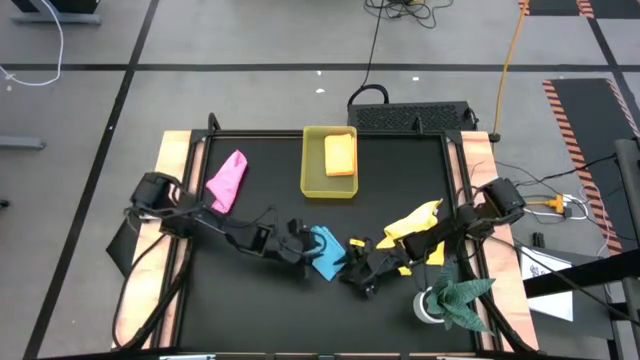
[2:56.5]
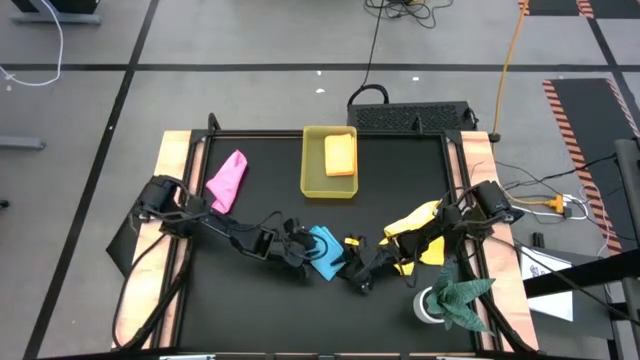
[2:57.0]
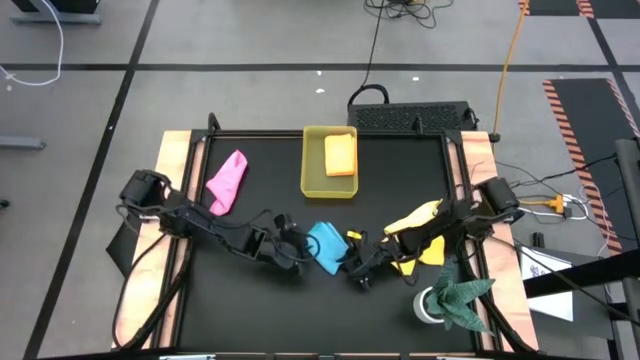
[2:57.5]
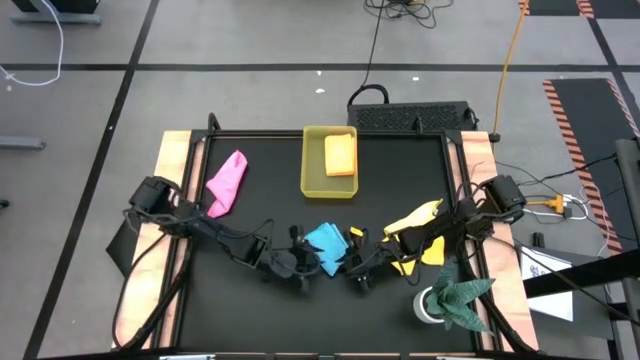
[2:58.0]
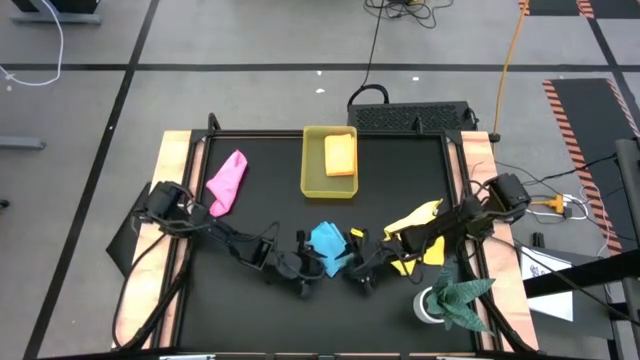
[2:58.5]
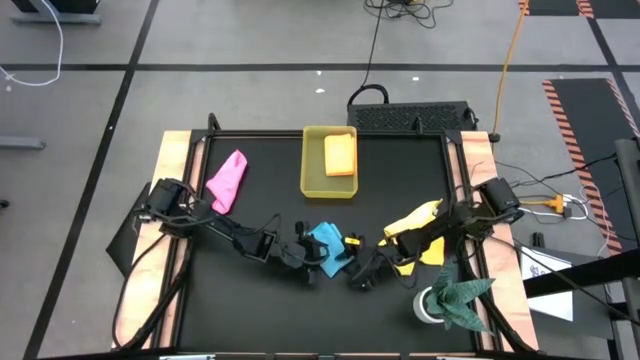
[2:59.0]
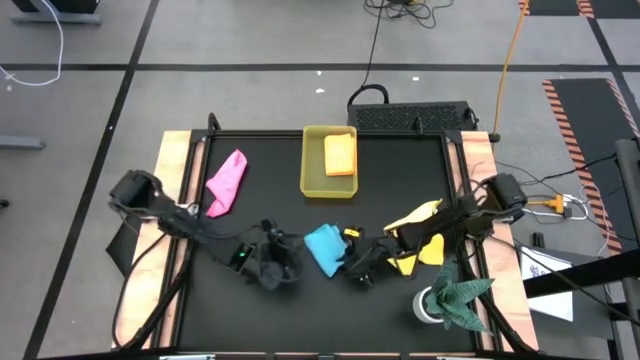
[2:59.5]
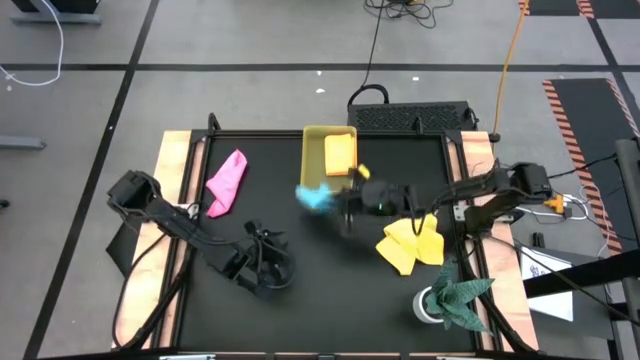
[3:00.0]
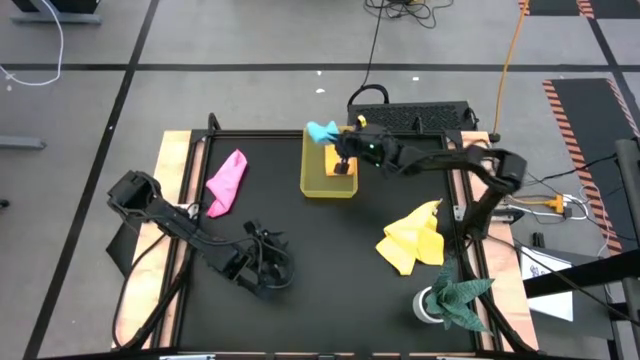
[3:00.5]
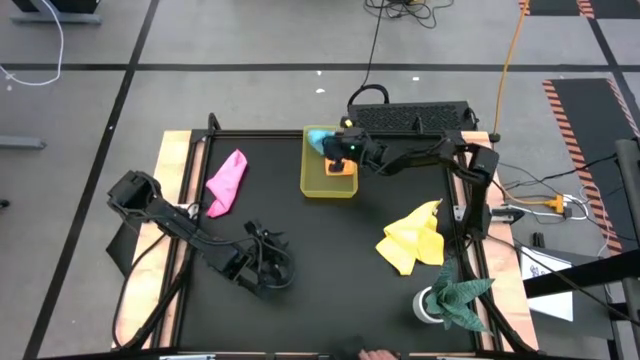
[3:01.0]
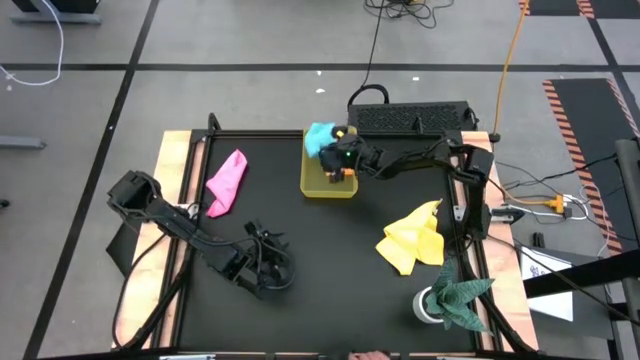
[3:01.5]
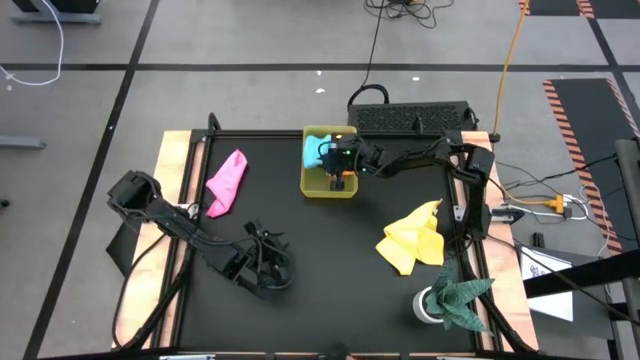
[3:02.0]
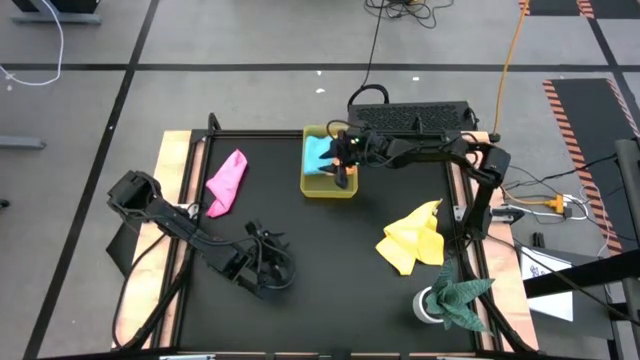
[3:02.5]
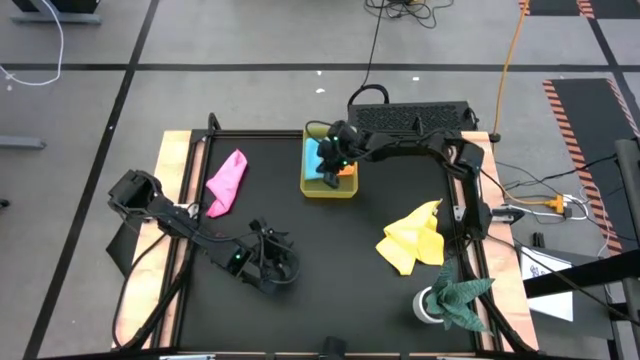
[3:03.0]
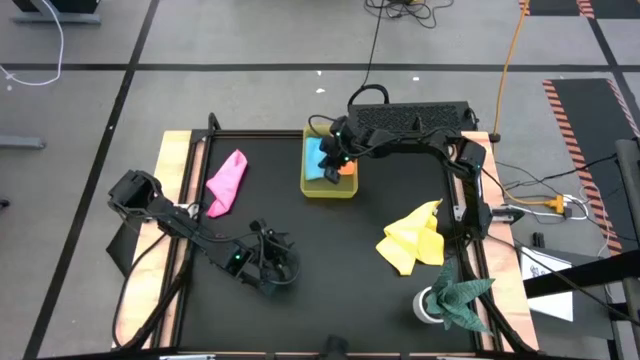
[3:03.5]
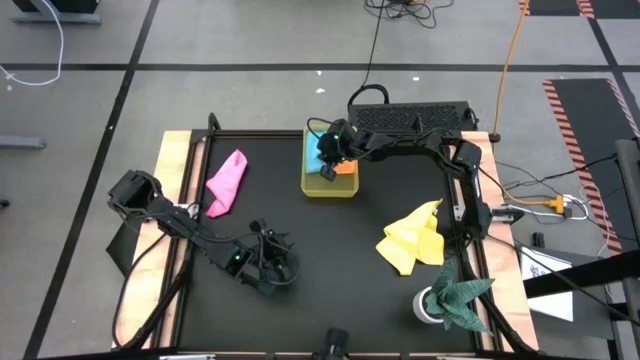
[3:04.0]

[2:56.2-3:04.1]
Task: Fold microfiber towels
Put the blue towel into the yellow bin

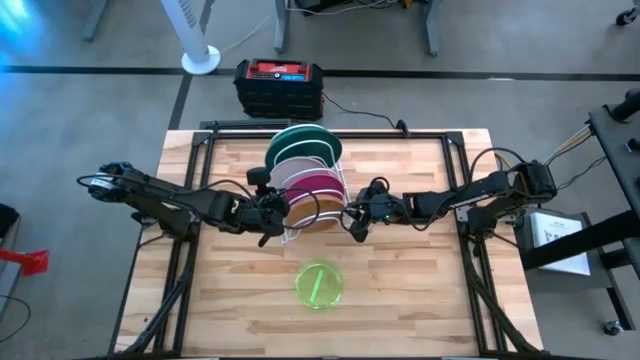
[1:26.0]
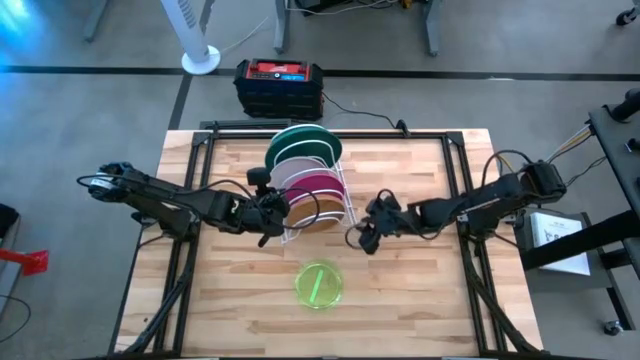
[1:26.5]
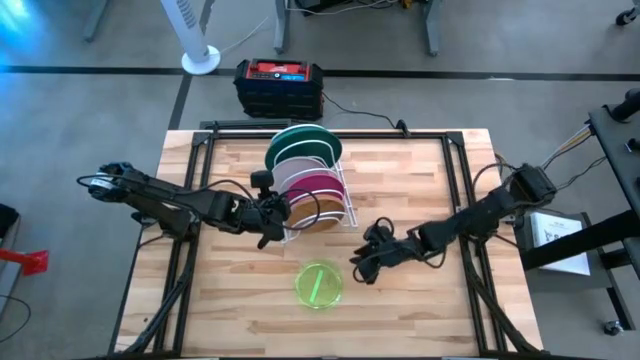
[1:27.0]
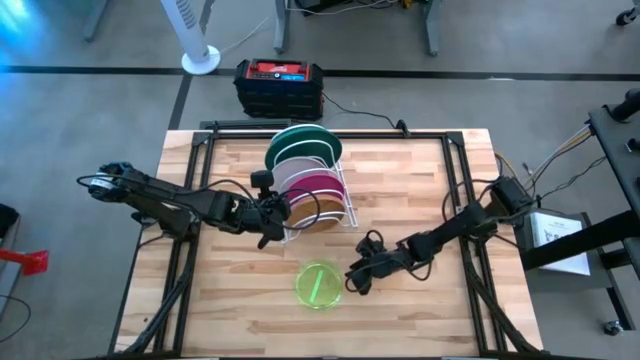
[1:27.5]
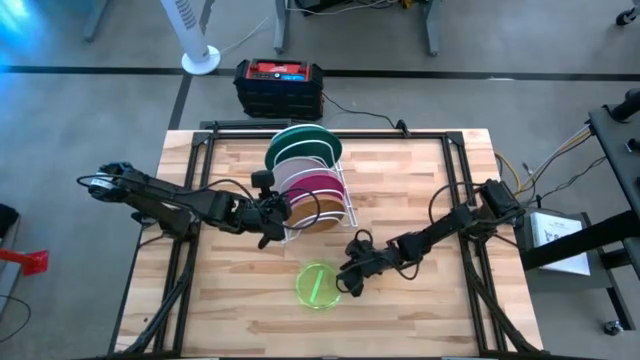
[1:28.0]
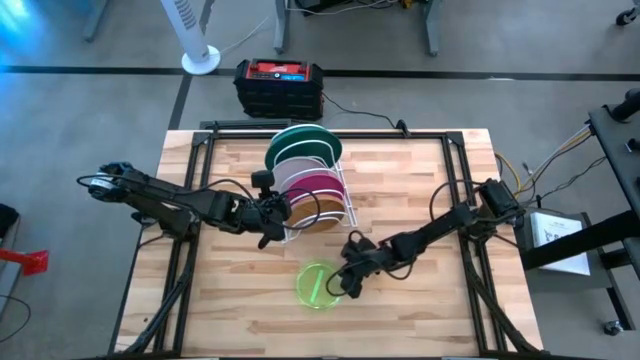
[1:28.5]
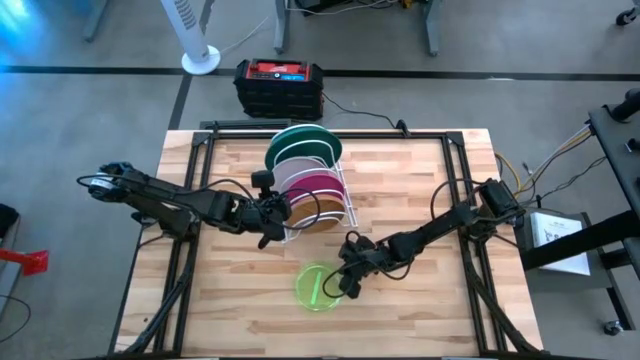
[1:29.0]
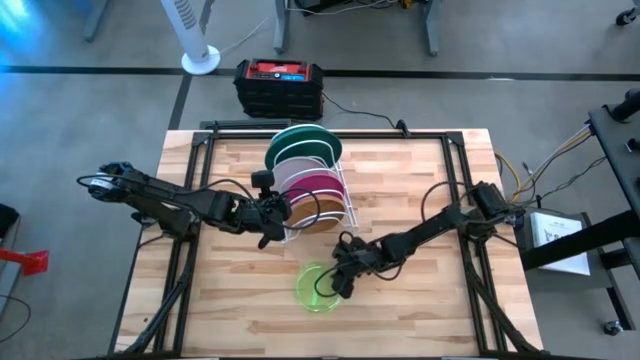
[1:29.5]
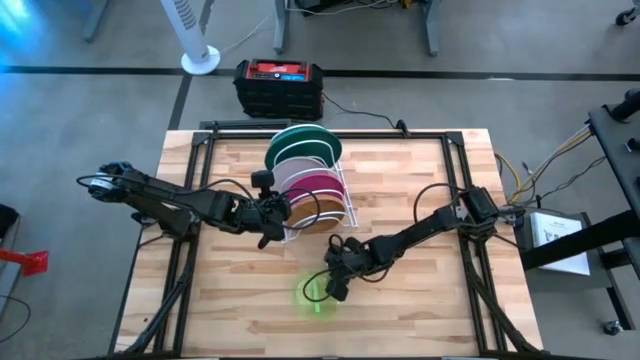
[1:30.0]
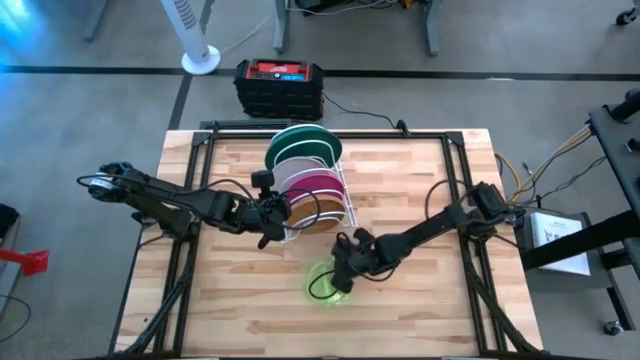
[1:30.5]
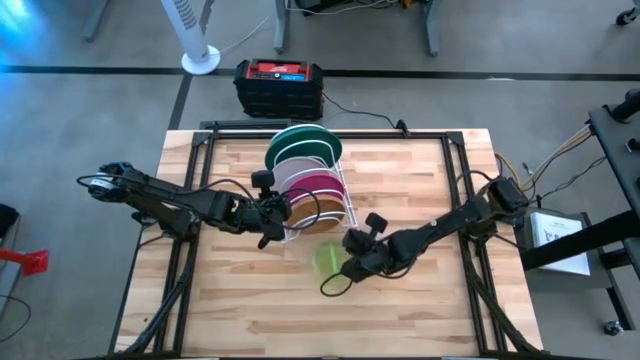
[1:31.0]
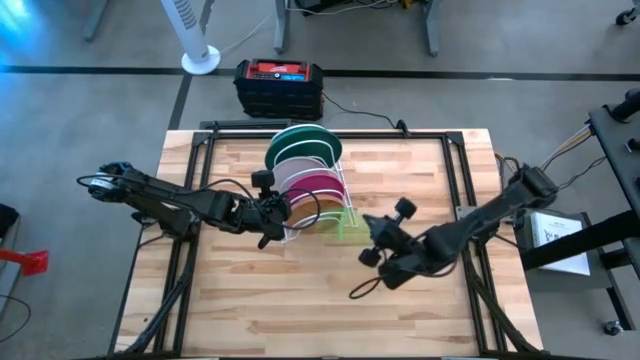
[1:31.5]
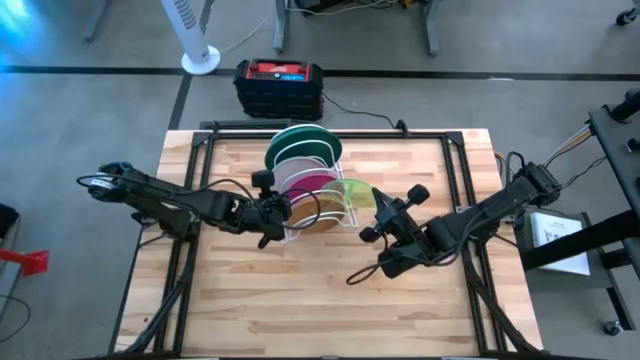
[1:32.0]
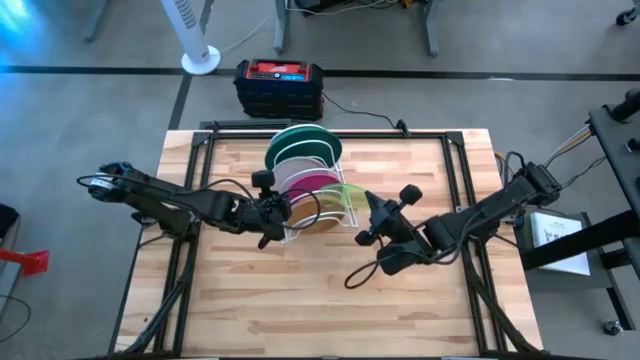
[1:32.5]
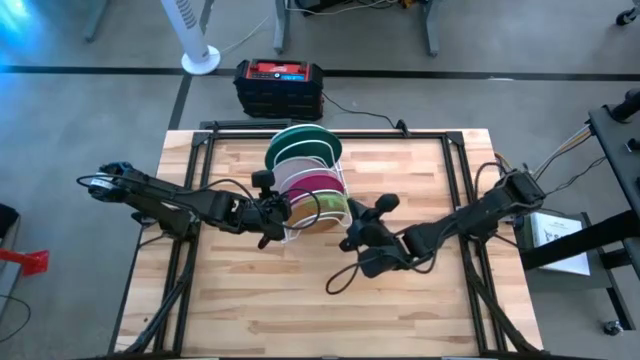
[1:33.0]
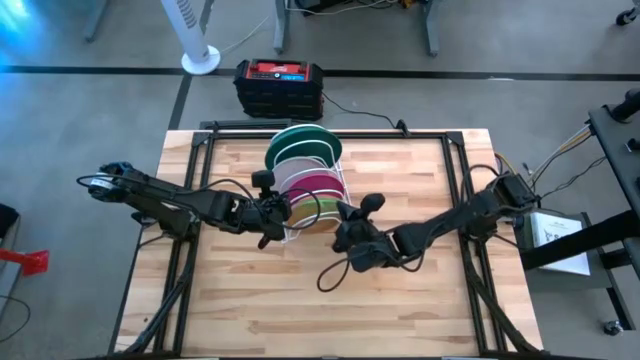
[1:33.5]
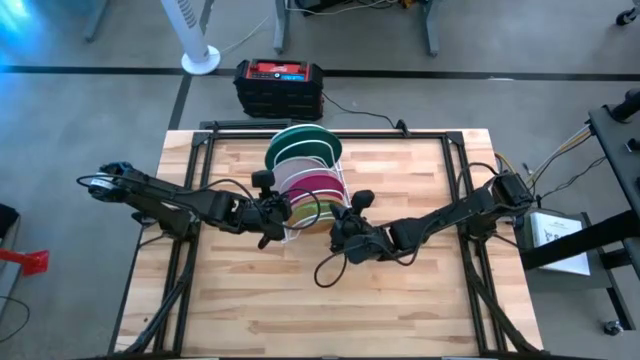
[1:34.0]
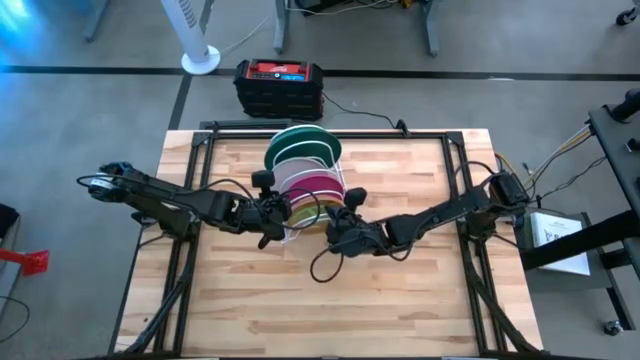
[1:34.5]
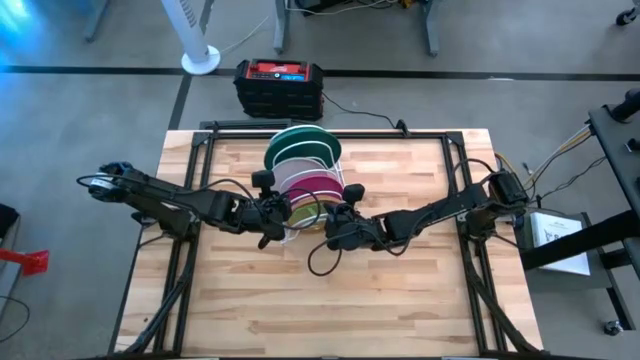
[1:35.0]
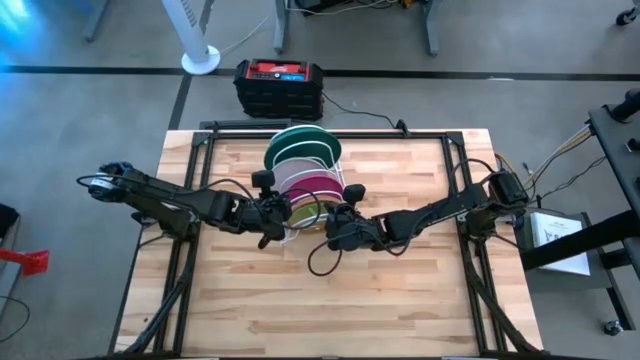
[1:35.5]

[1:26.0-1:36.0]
Task: Sort dishes
Put the light green plate in the dish rack
